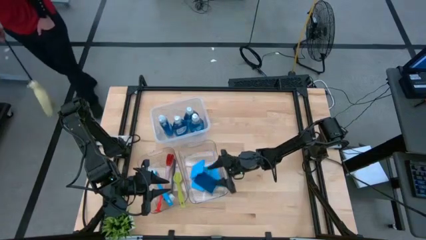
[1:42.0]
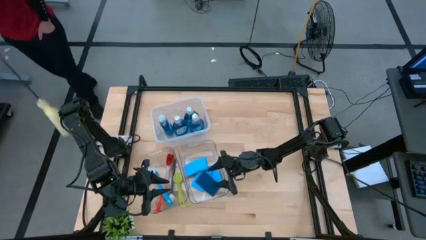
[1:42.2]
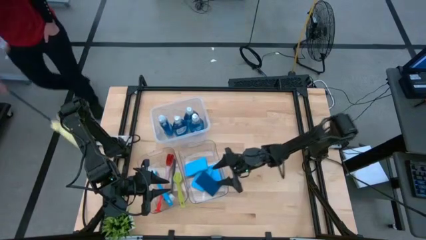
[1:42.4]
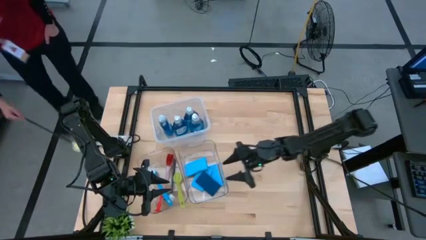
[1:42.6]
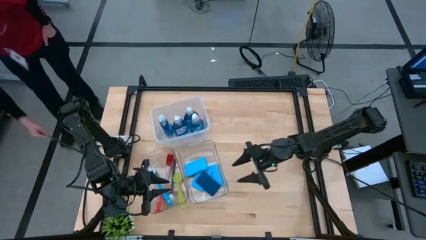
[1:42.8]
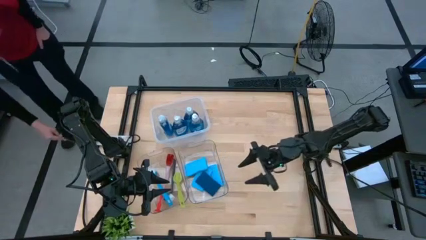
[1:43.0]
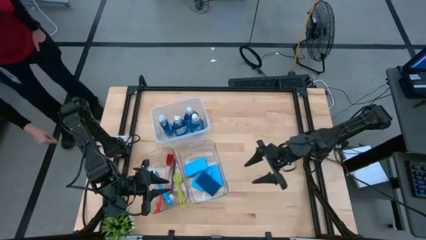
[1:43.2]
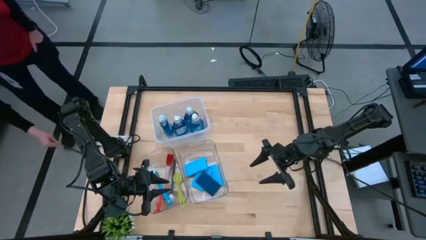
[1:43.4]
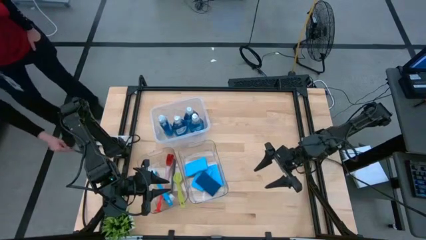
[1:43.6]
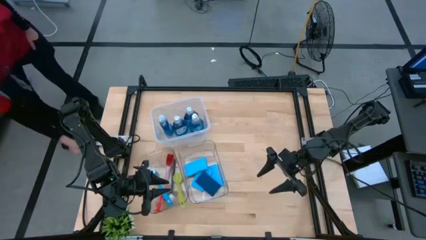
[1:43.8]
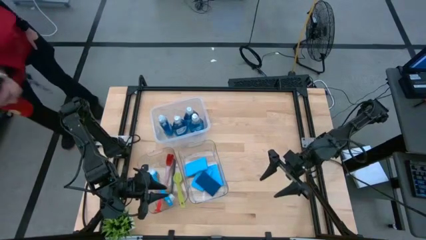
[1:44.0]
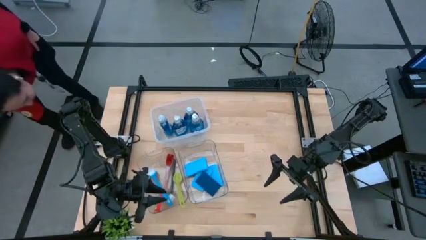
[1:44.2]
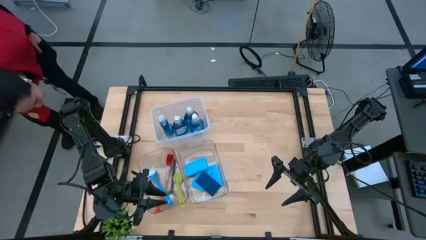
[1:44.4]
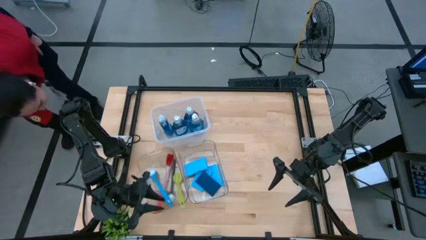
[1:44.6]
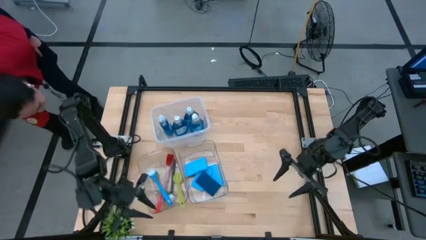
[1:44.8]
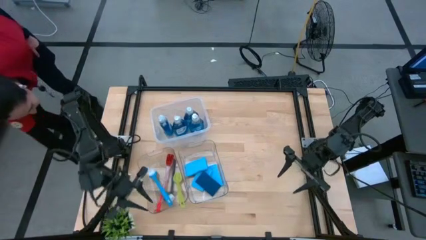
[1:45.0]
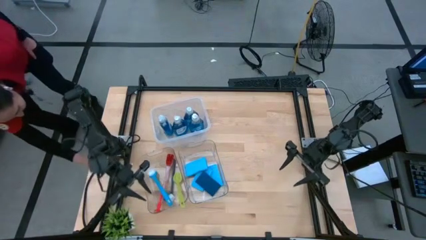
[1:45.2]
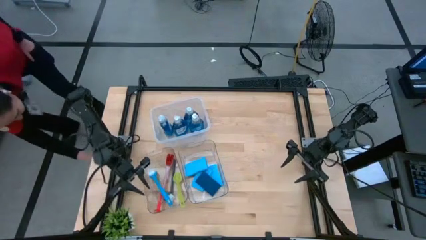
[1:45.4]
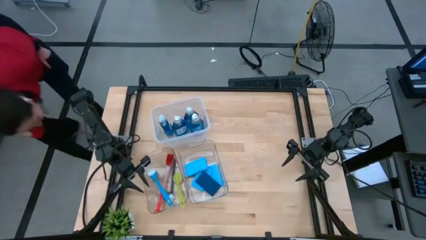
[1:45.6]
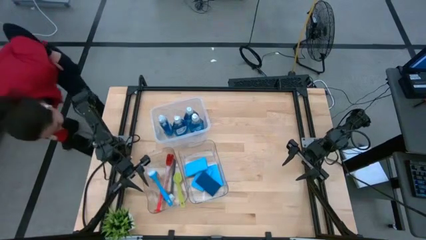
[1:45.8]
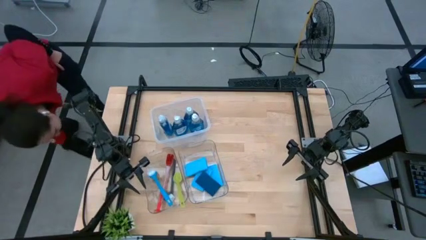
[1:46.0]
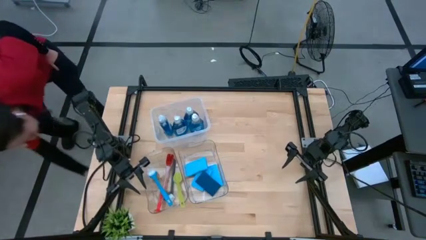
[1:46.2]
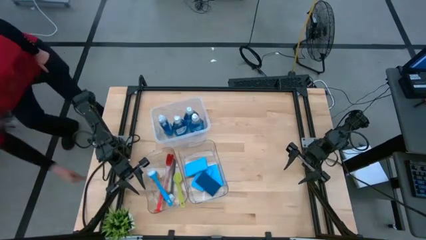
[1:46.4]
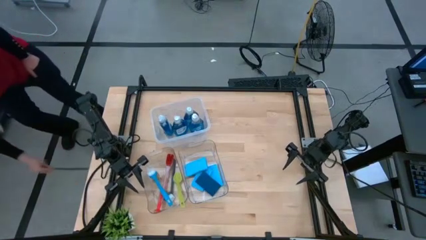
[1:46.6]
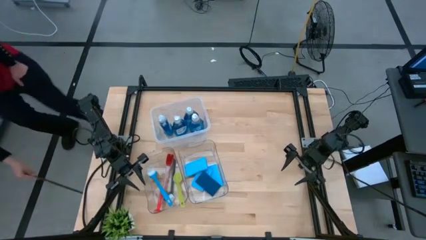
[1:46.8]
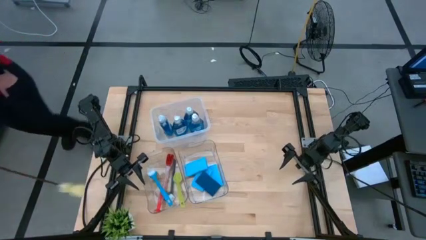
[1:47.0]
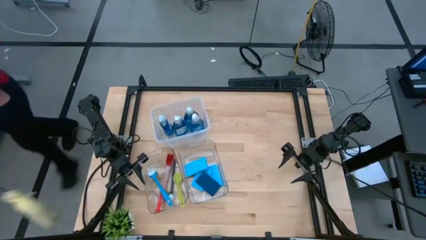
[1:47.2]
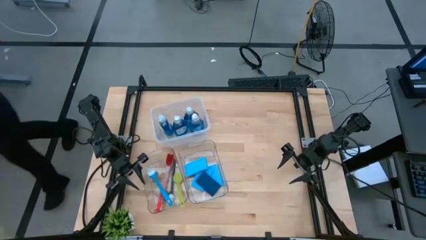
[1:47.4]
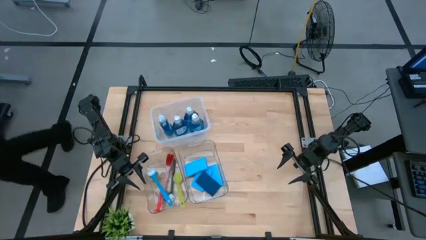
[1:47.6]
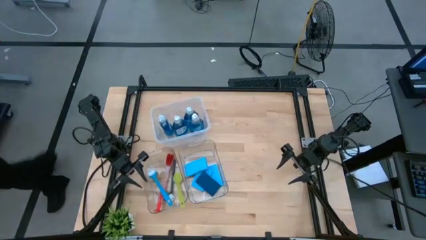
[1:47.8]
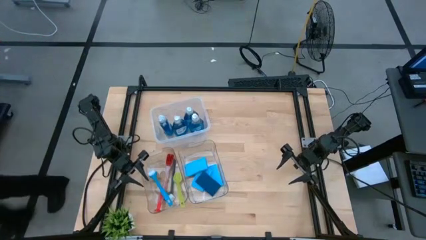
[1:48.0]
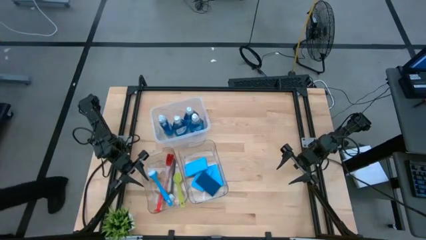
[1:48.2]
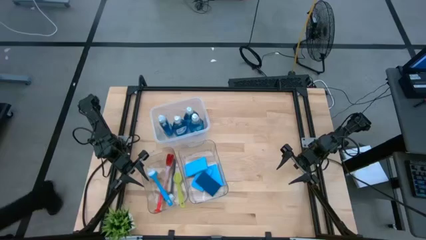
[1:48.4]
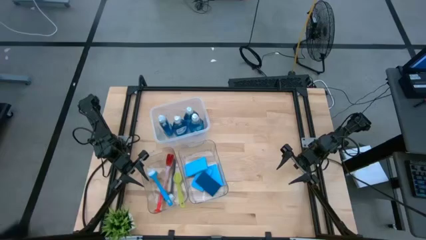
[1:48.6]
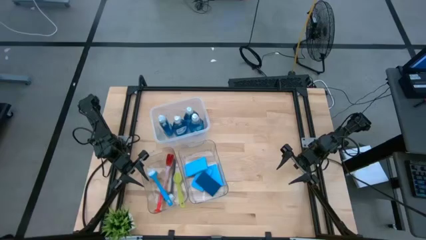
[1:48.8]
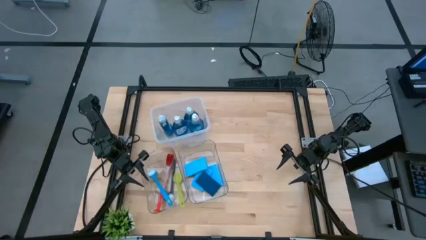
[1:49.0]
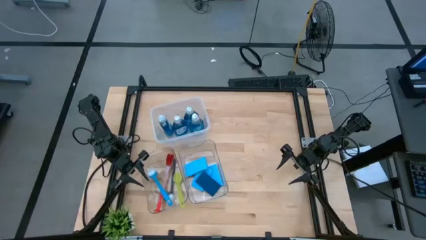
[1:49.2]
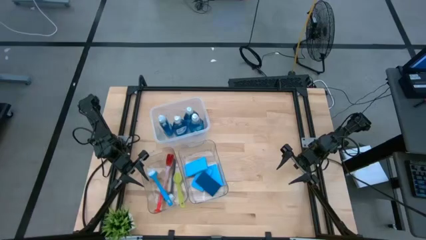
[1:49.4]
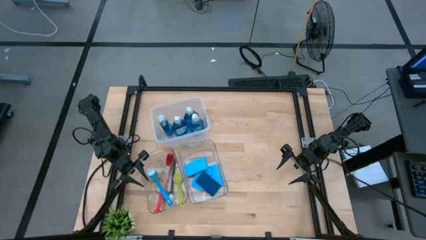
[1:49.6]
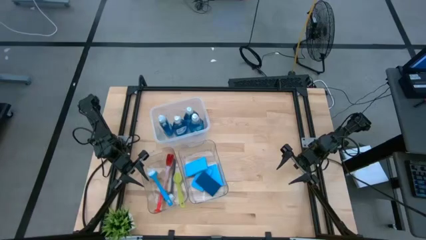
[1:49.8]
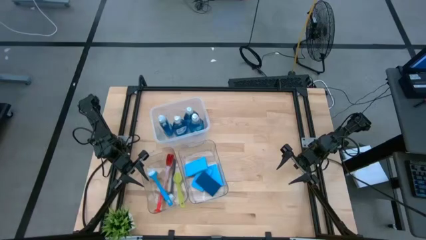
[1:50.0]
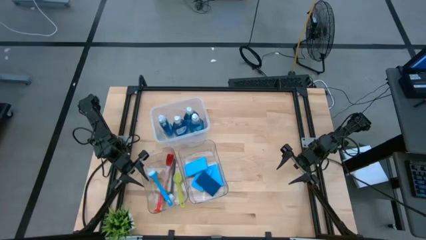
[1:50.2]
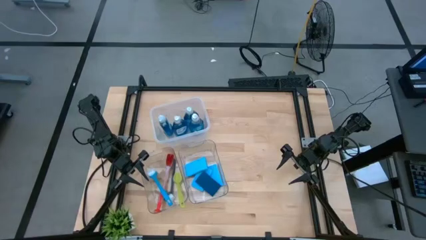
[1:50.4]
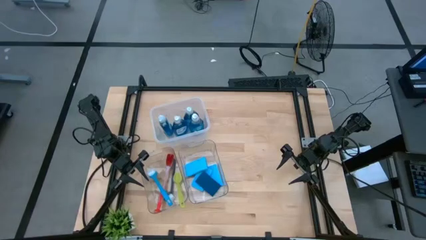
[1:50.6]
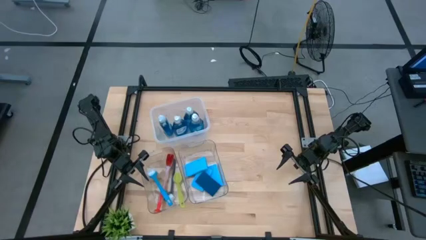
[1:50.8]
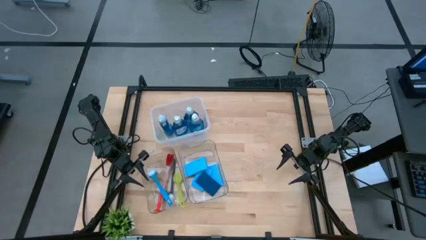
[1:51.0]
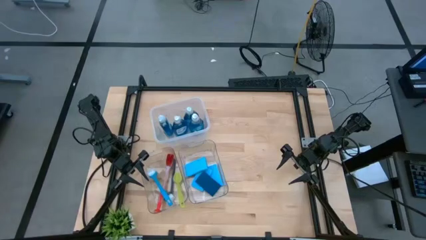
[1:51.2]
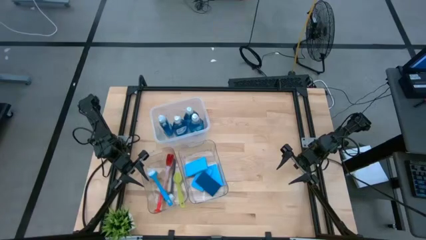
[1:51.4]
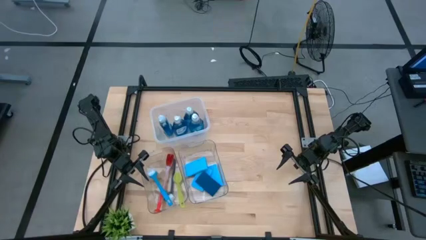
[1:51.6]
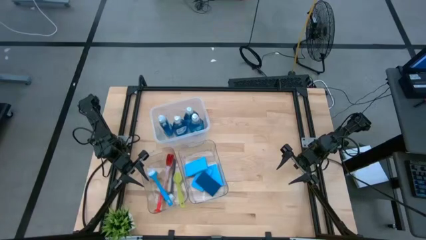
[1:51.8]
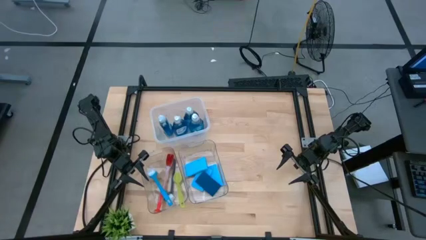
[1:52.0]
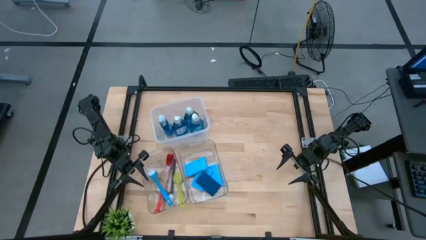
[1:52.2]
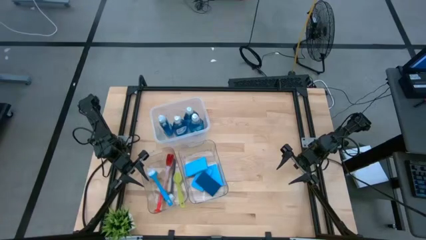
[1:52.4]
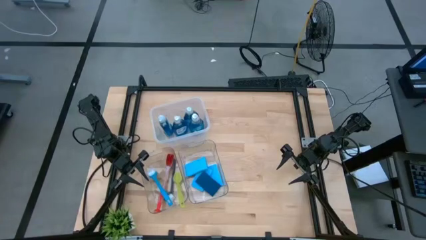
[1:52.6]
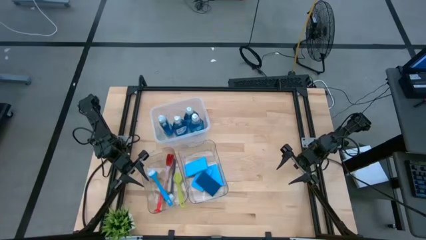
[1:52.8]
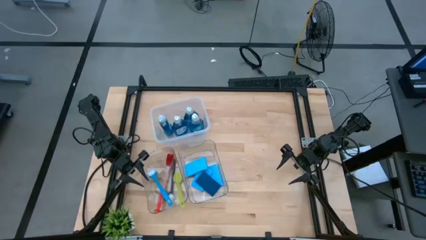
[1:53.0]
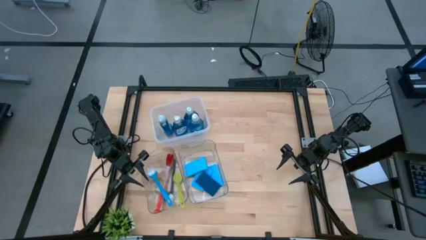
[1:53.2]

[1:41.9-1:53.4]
Task: Pick & Place Kitchen Sink Supplies
Return to Home Position

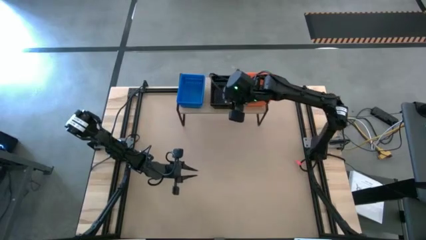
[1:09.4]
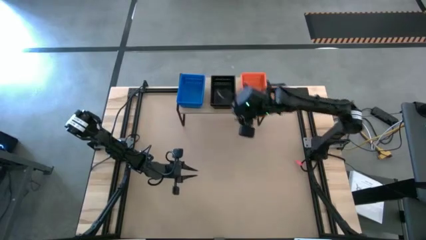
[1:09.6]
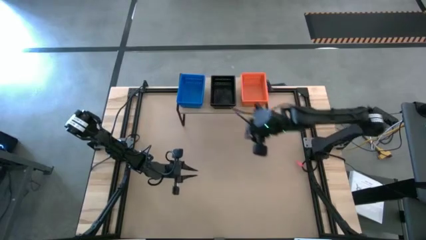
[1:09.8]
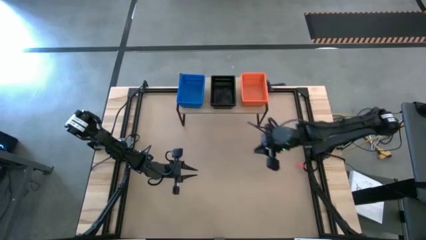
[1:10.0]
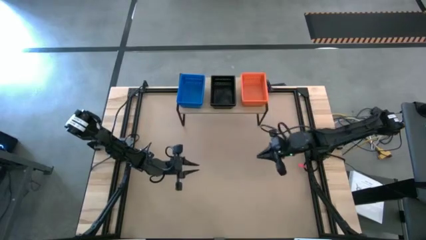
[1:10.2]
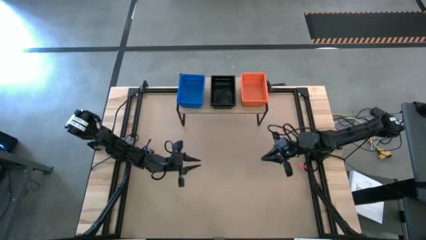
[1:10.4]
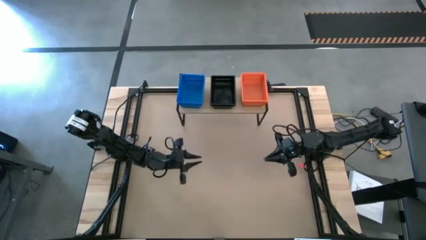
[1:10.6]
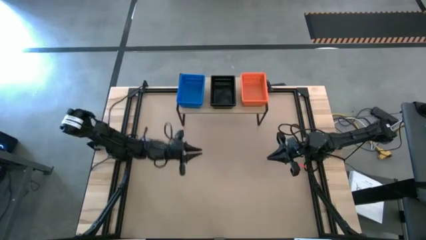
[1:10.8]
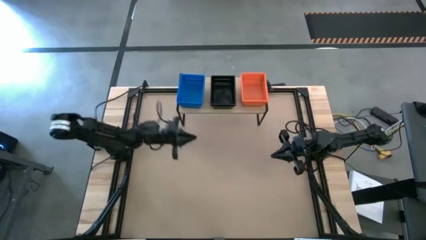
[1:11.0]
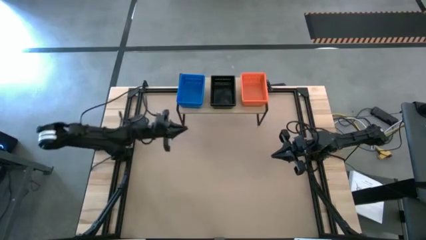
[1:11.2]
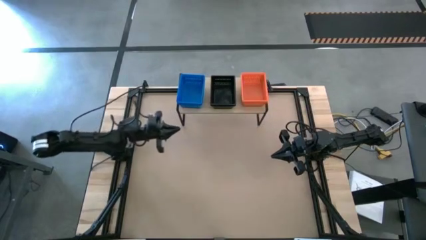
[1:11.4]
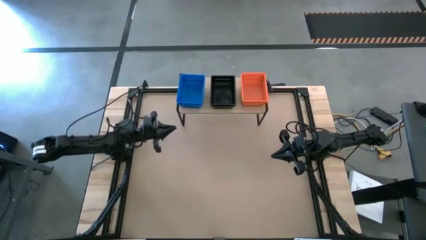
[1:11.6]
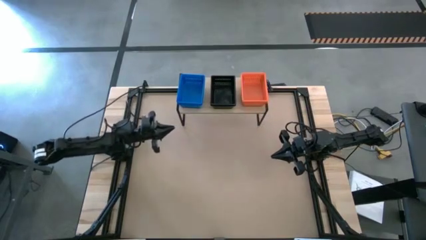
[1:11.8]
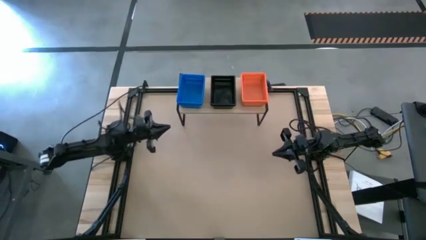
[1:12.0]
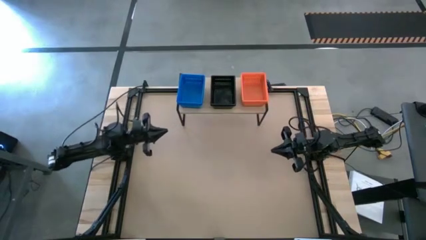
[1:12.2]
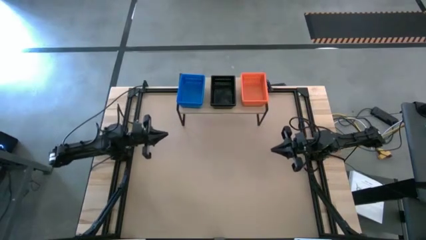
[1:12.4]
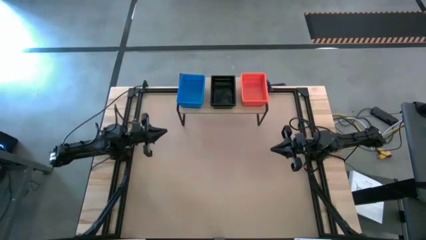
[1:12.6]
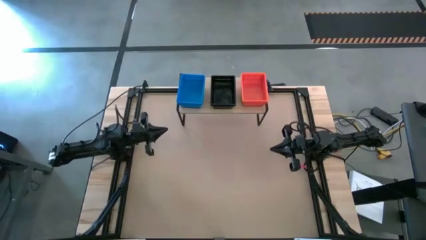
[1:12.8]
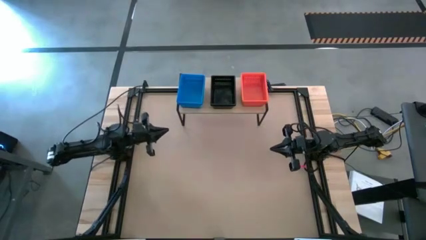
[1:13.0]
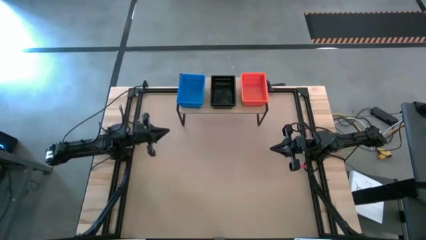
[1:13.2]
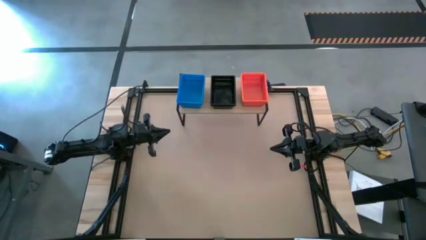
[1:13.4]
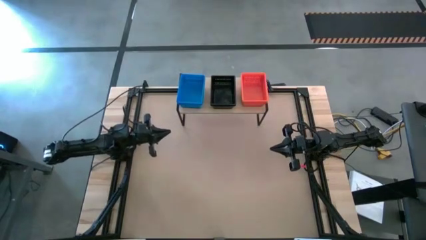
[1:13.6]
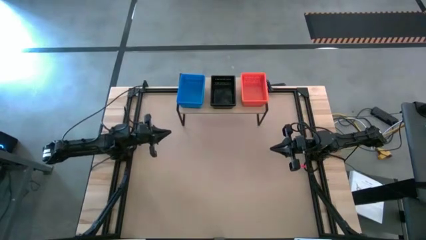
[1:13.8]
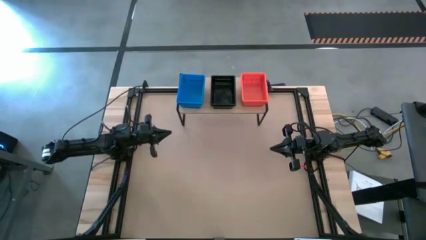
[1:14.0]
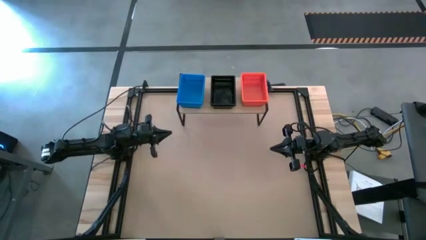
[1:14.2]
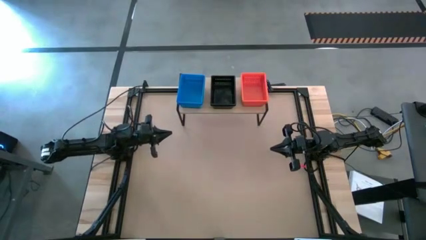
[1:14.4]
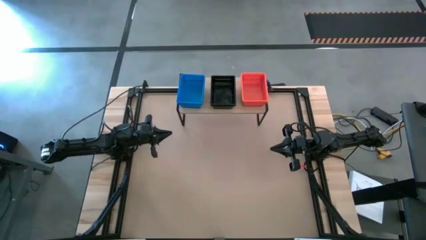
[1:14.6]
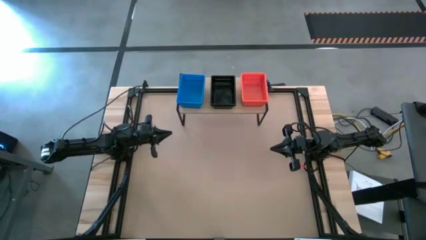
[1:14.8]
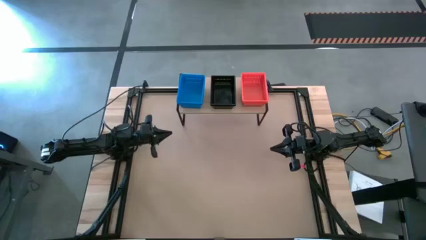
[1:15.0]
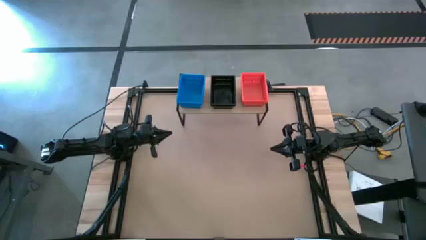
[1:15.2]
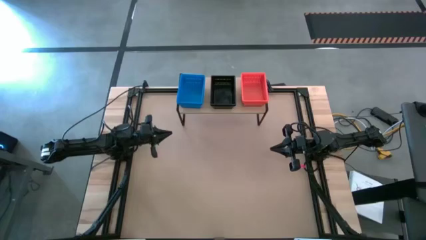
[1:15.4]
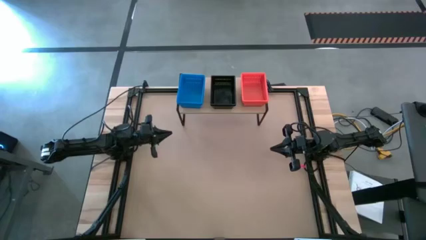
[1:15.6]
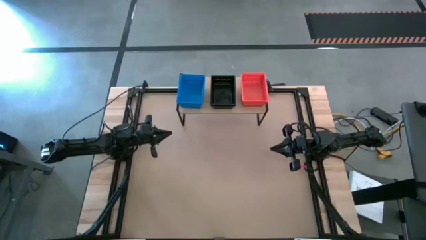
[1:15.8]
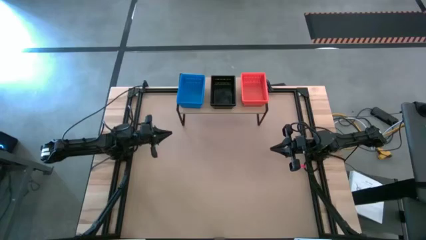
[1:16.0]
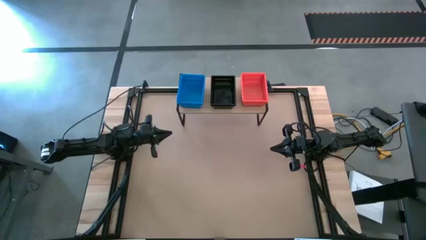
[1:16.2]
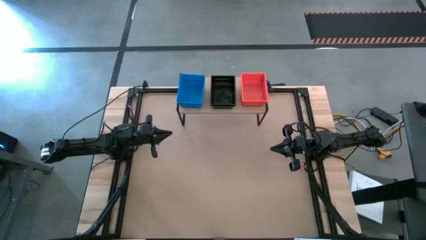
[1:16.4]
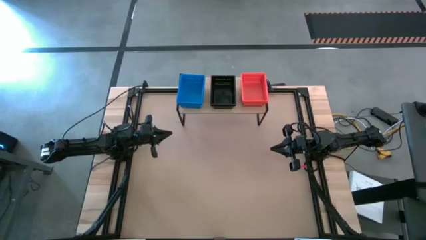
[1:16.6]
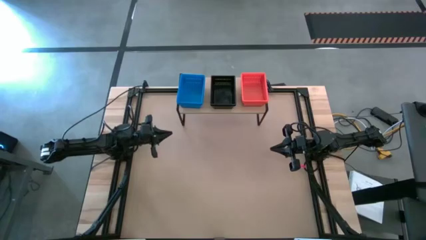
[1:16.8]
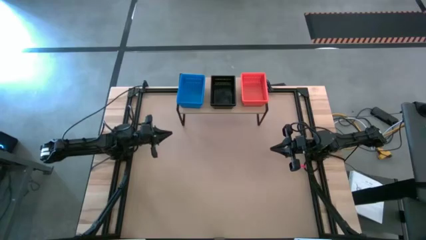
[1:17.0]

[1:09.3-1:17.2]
Task: Stack baskets on shelf by color
Return to Home Position
